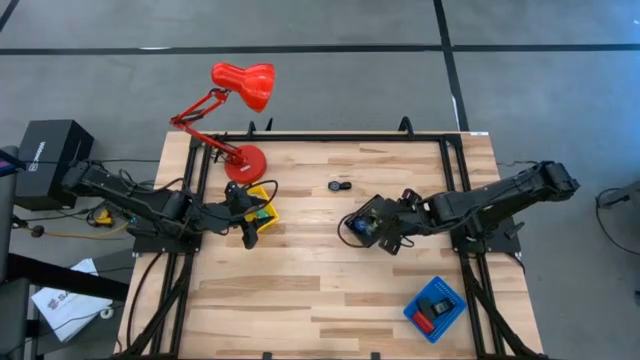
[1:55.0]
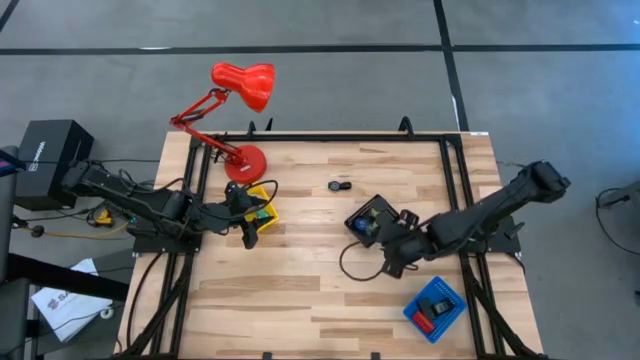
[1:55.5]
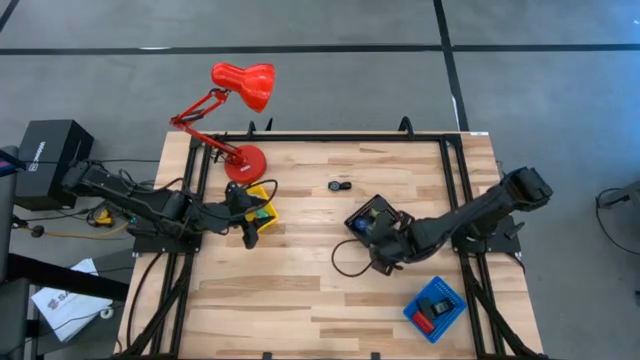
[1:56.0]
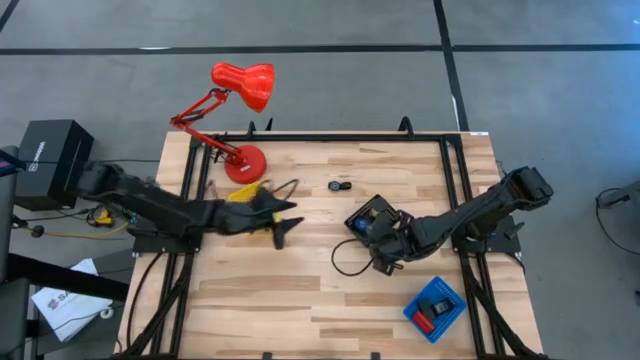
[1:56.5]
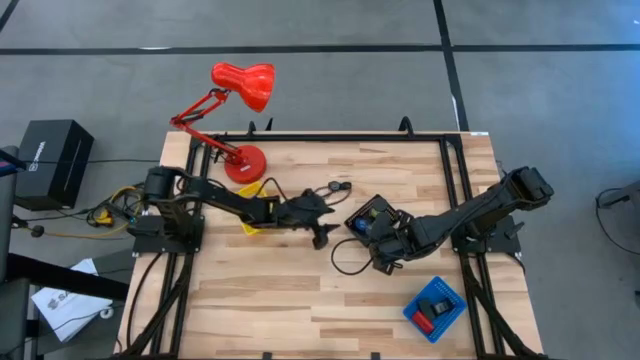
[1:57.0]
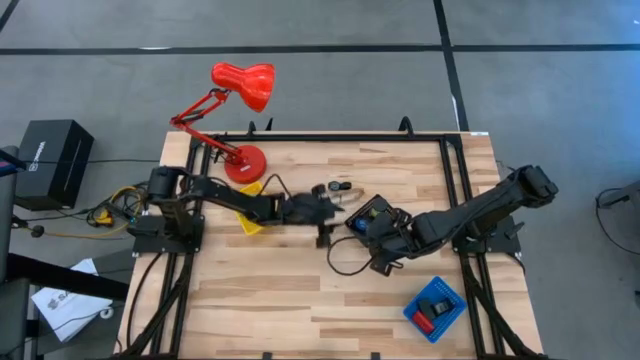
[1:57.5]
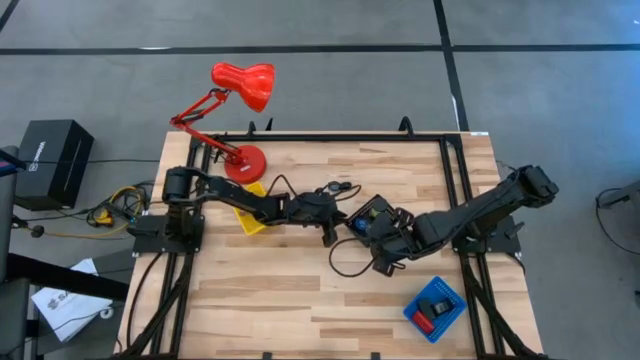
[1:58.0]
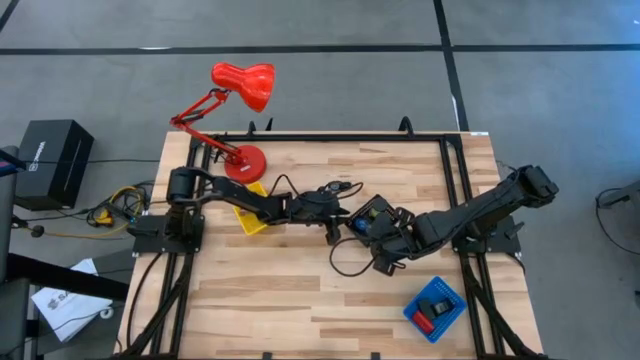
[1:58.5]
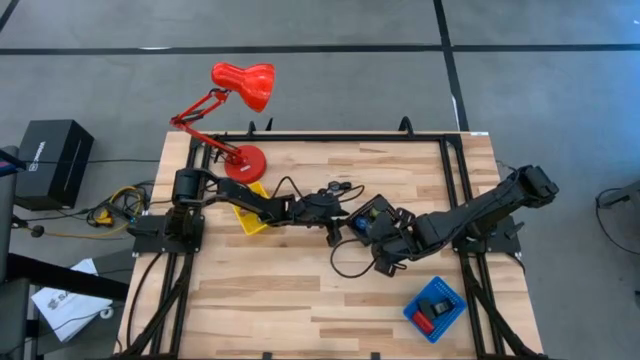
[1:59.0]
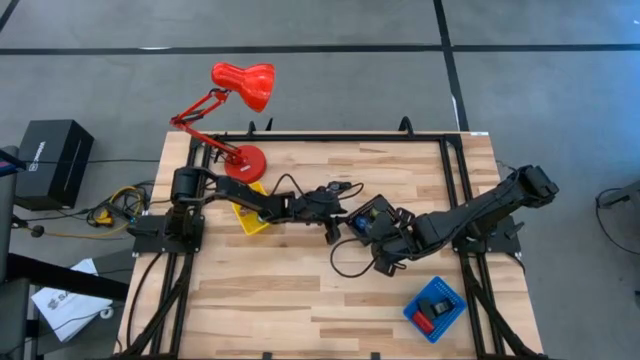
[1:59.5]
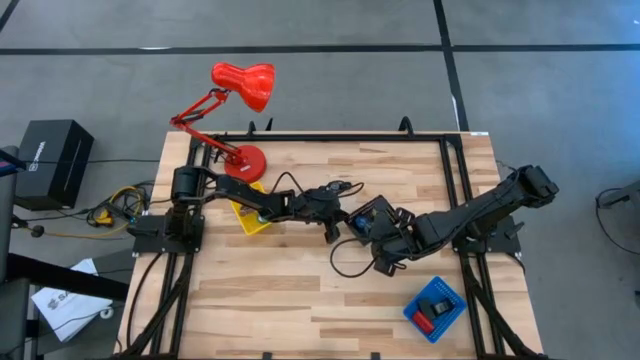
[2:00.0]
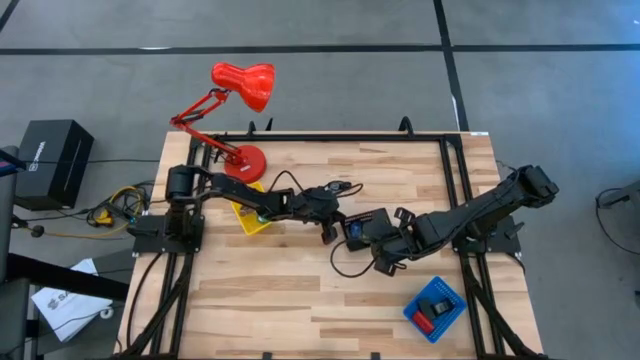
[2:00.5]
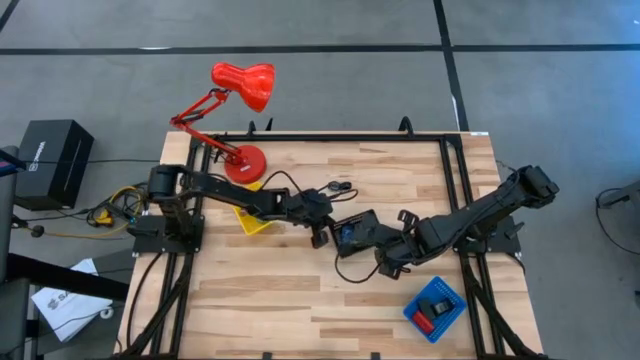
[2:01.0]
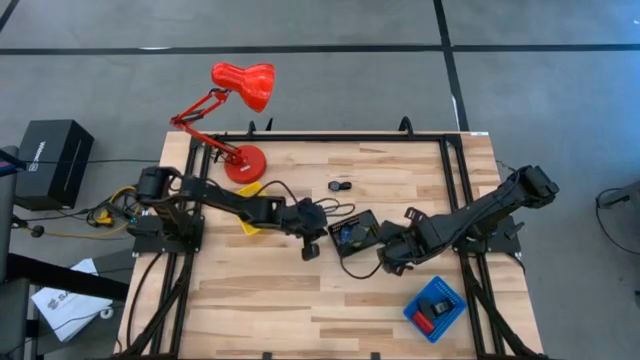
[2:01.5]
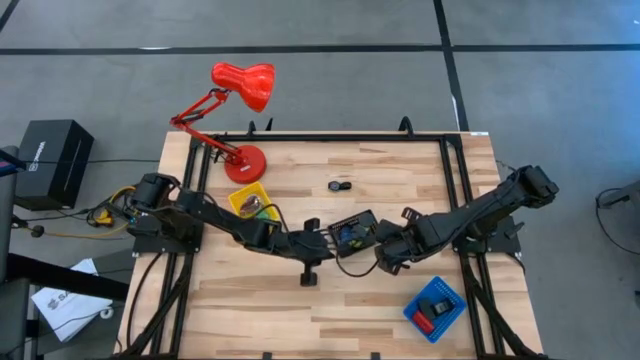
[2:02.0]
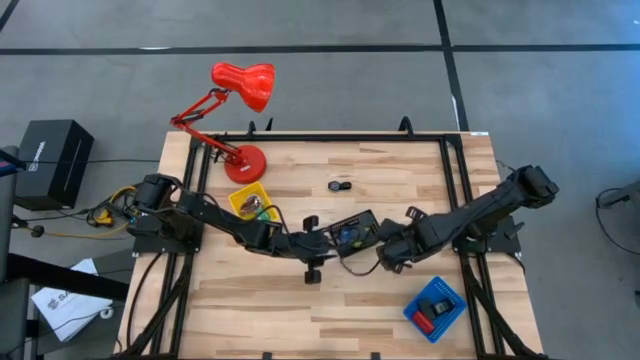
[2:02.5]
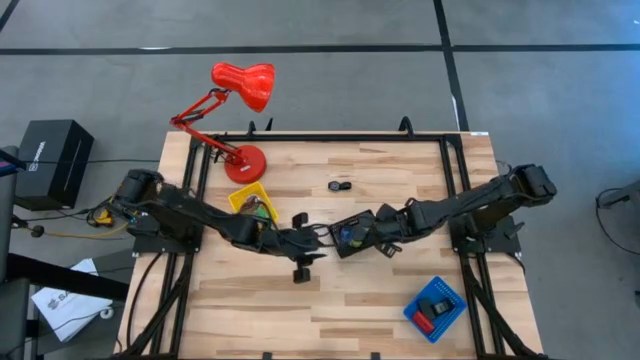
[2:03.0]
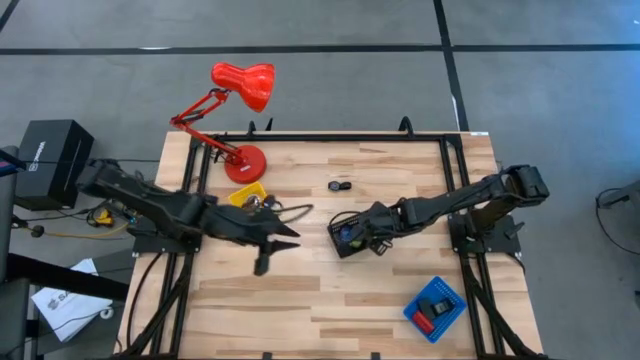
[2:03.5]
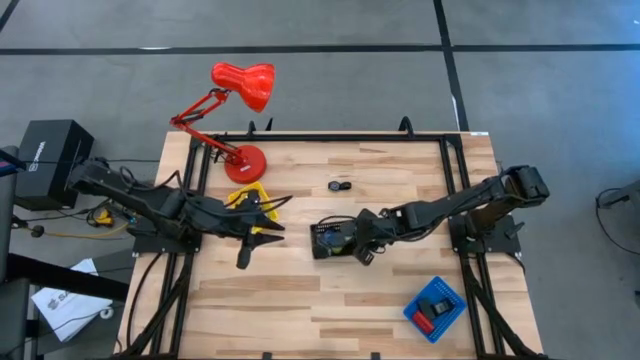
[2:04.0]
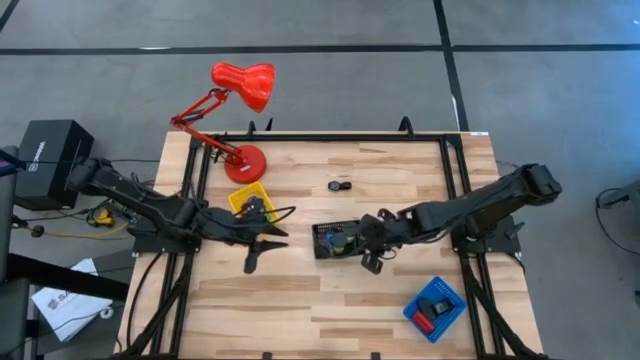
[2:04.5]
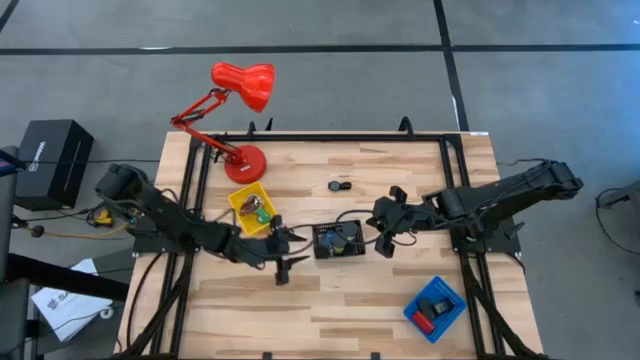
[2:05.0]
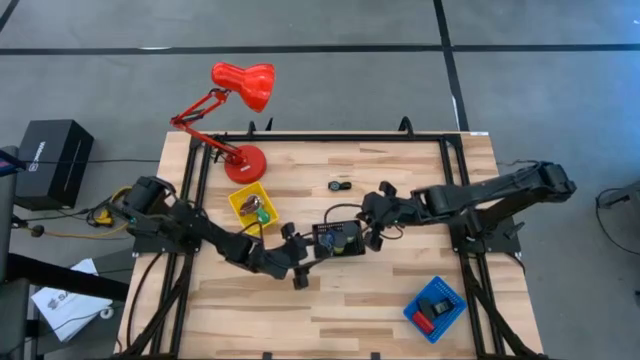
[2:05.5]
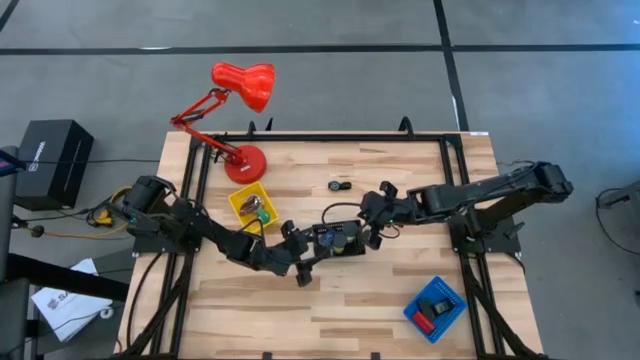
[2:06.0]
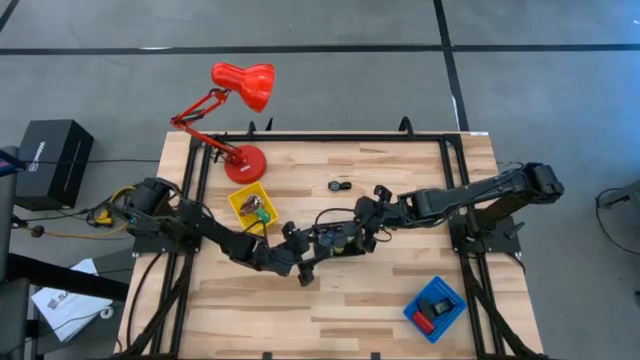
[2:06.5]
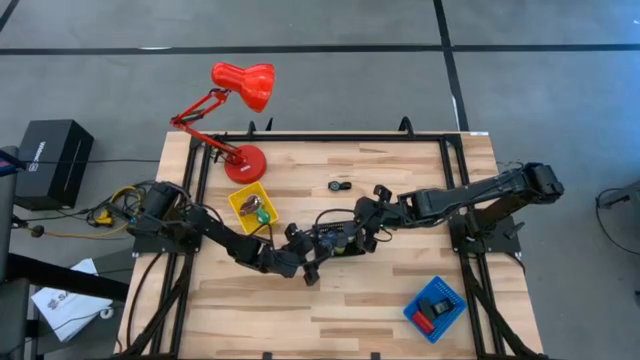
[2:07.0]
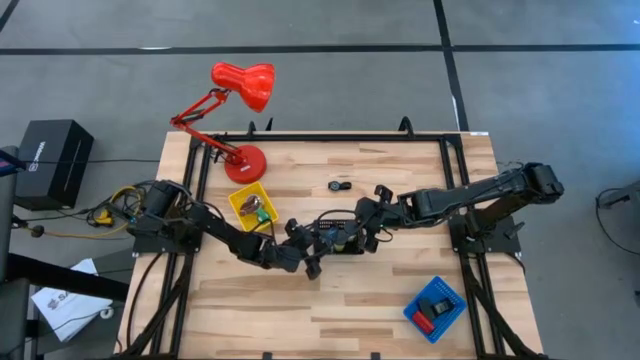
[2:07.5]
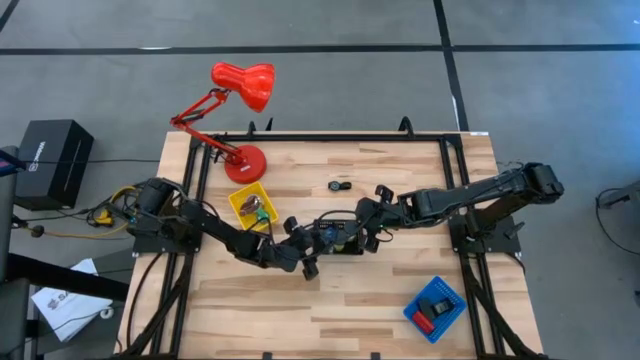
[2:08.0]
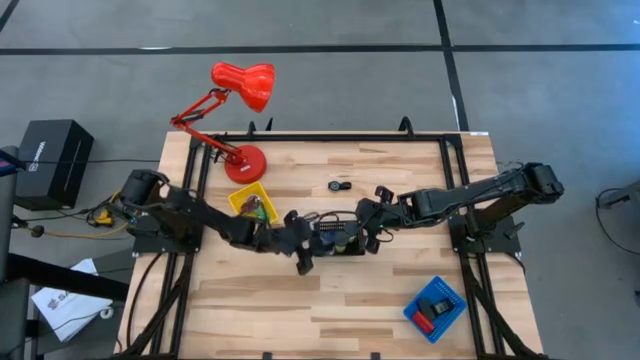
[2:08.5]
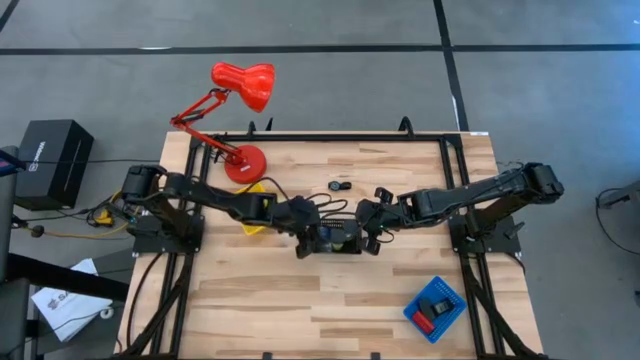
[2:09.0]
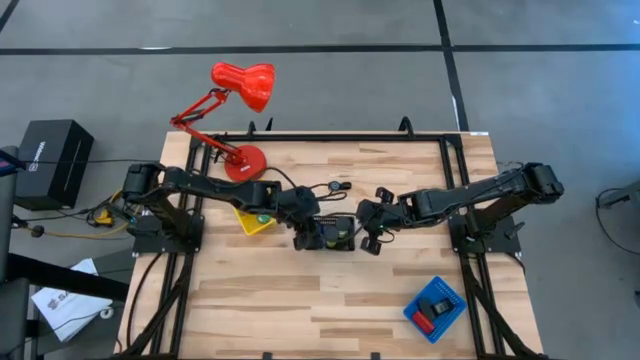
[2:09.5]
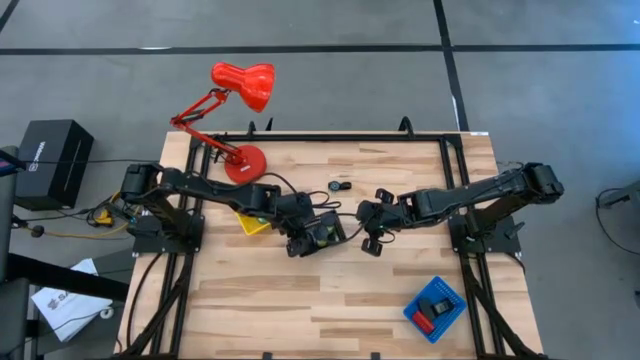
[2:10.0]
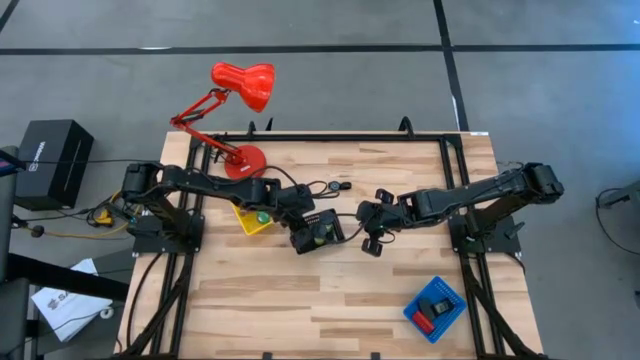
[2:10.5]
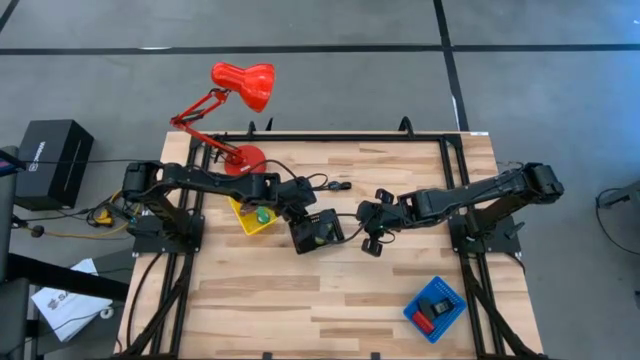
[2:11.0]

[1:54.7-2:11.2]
Task: Pick & Place Office items
Move the black bin to the center of the table

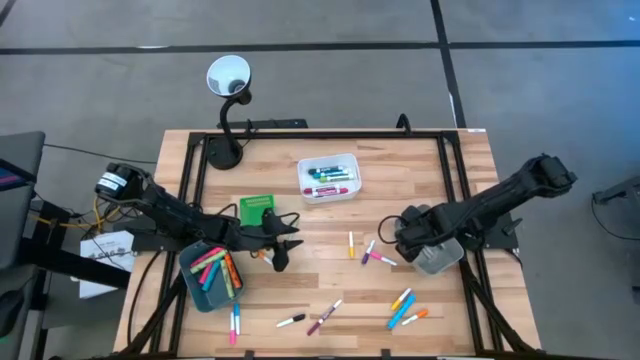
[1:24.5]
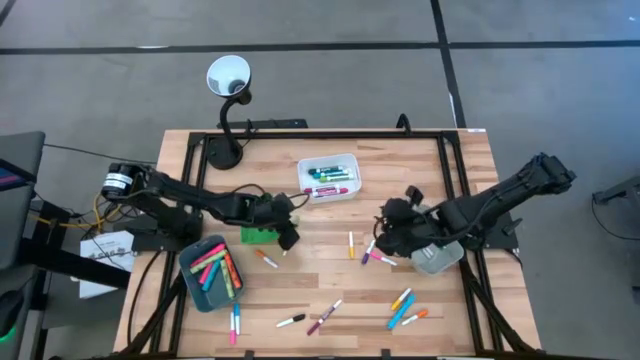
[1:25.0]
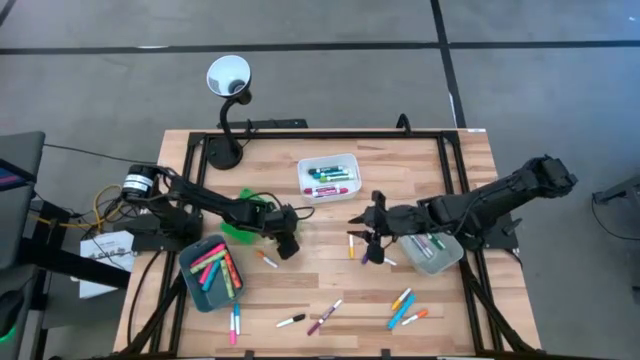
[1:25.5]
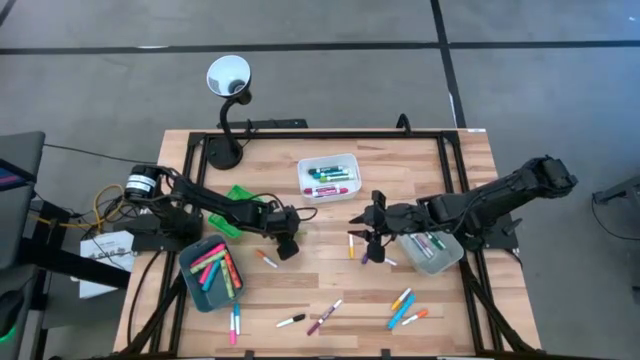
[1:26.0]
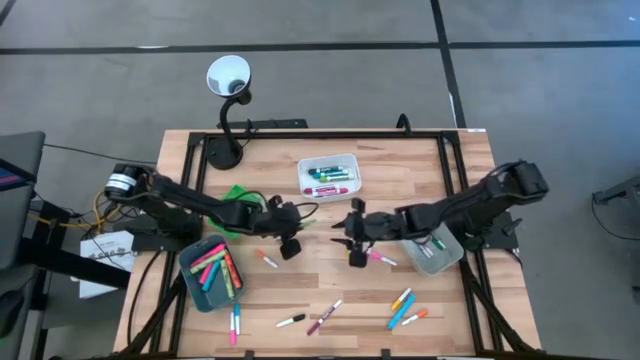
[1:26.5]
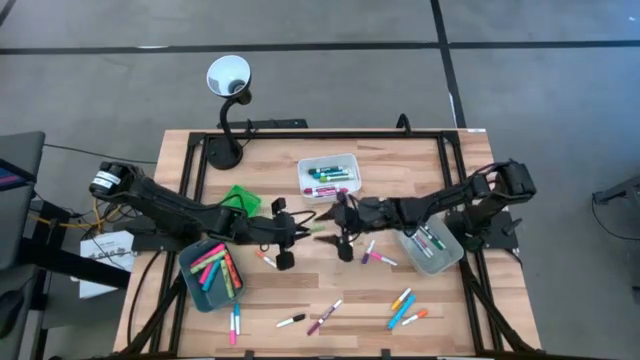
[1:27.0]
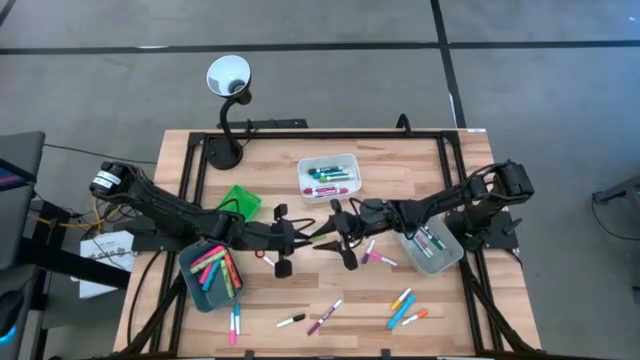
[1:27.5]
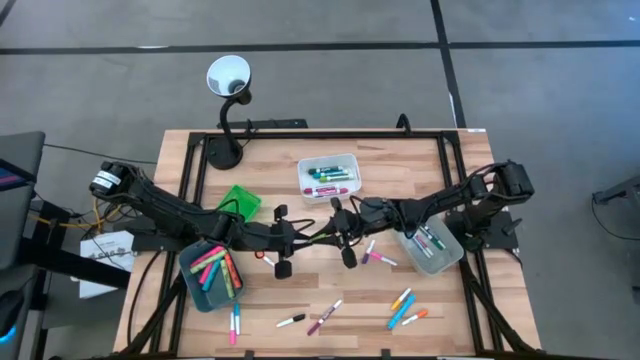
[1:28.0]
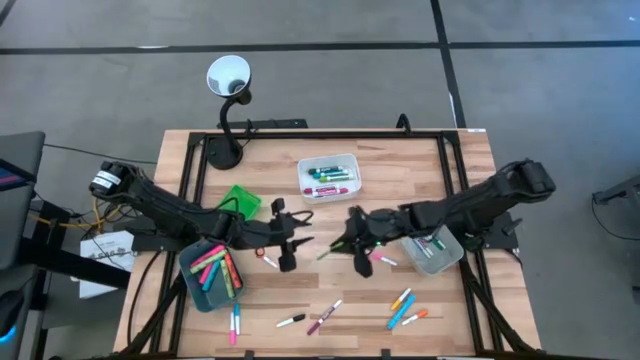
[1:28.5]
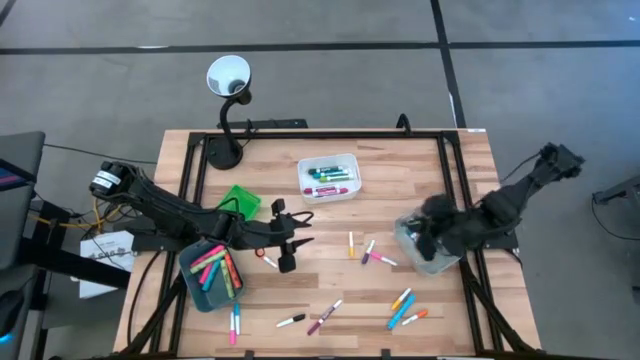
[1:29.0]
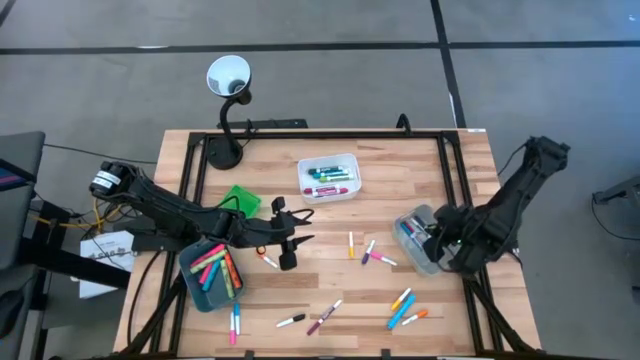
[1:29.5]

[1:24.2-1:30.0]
Task: Pick & Place Markers
Put the small light green marker pen into the gray bin
